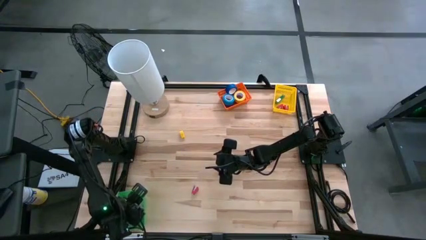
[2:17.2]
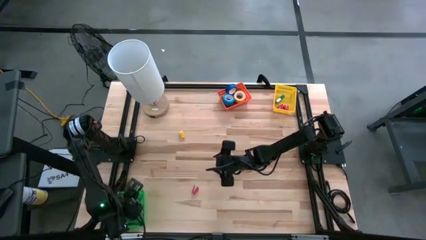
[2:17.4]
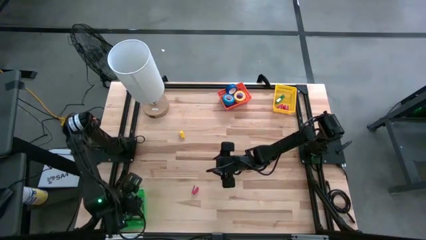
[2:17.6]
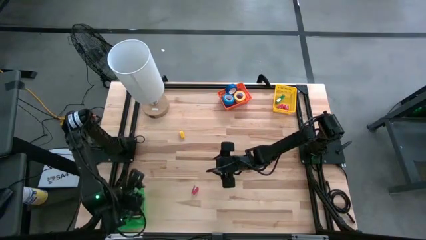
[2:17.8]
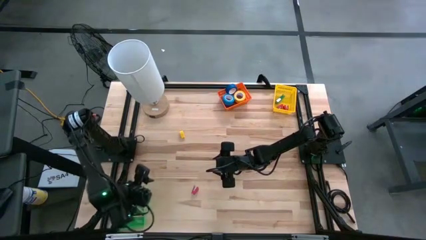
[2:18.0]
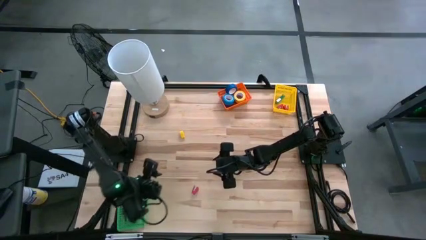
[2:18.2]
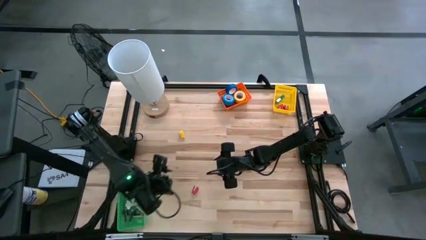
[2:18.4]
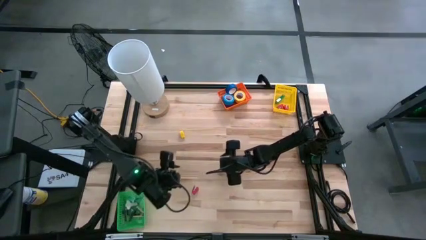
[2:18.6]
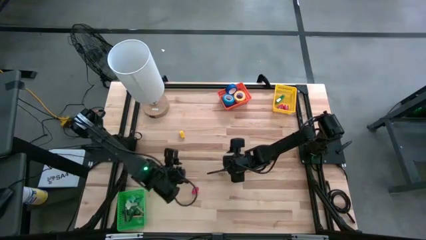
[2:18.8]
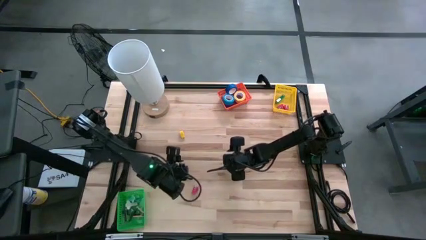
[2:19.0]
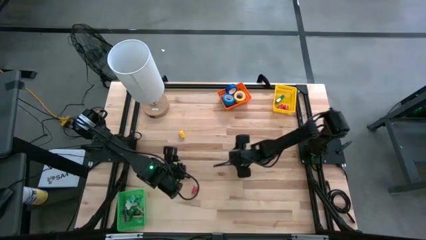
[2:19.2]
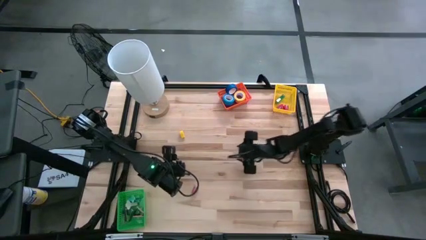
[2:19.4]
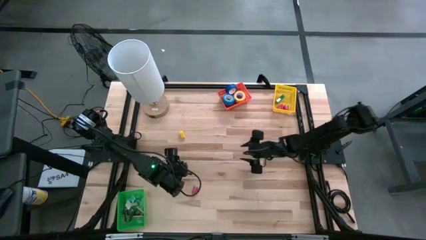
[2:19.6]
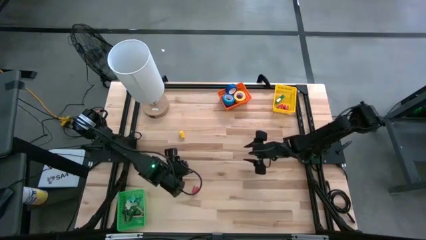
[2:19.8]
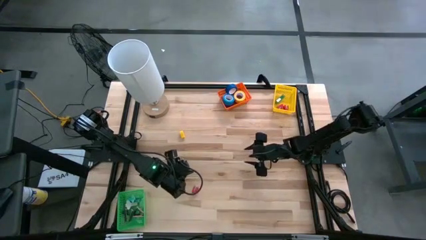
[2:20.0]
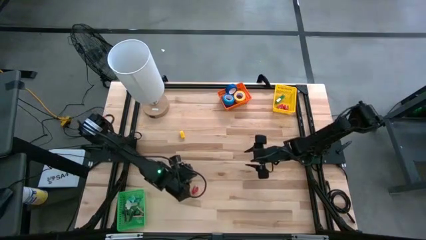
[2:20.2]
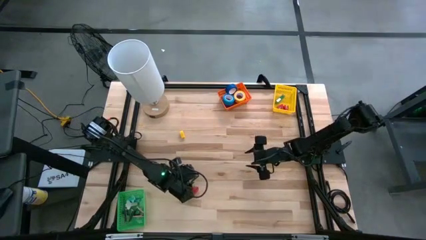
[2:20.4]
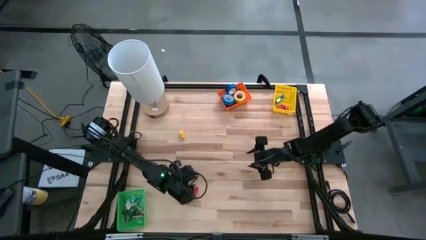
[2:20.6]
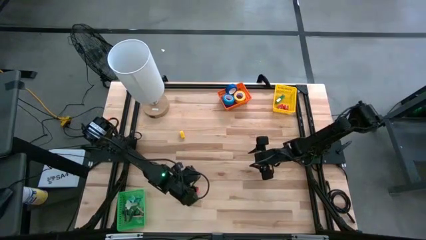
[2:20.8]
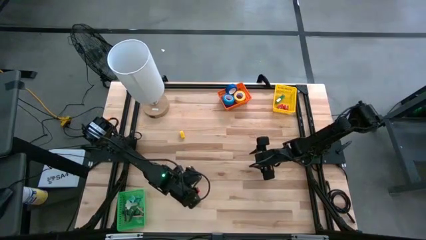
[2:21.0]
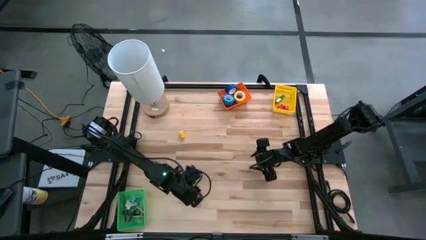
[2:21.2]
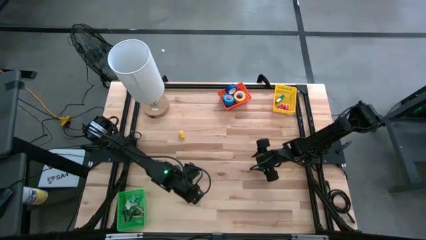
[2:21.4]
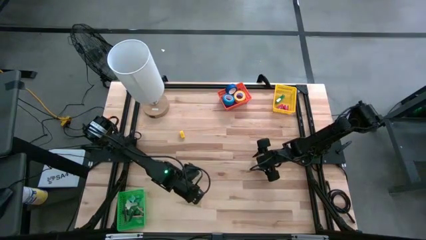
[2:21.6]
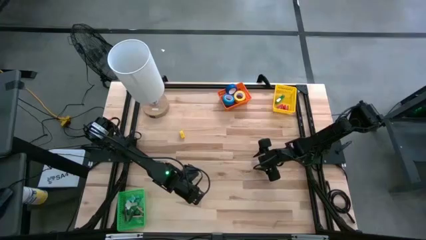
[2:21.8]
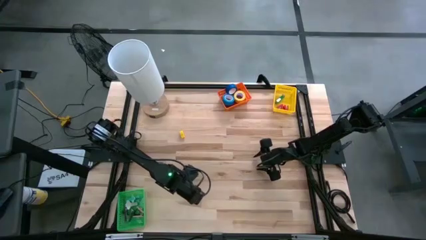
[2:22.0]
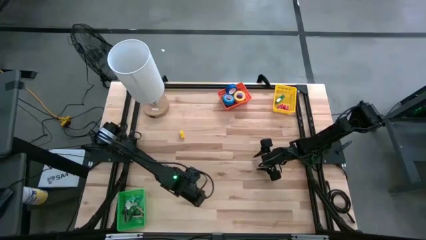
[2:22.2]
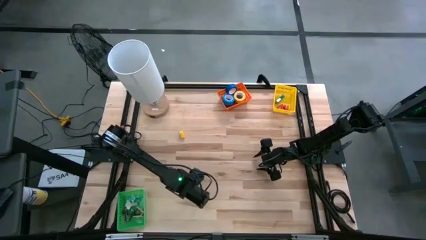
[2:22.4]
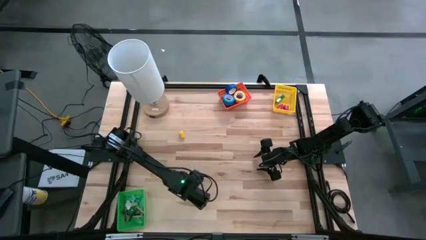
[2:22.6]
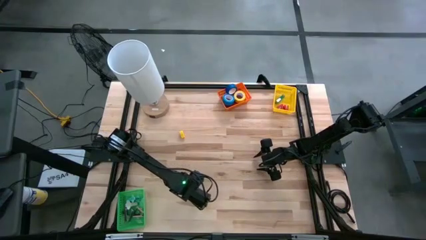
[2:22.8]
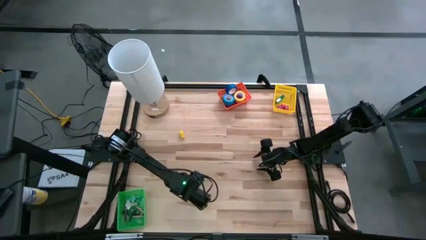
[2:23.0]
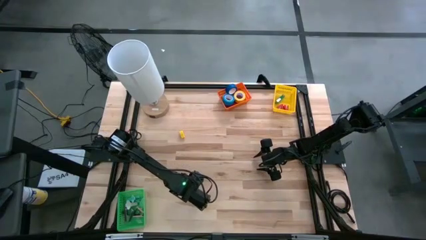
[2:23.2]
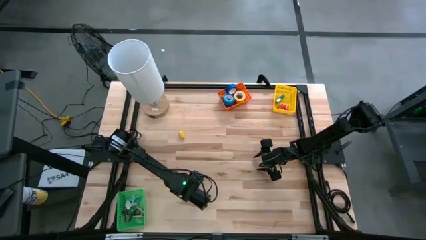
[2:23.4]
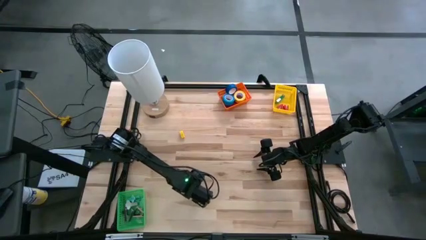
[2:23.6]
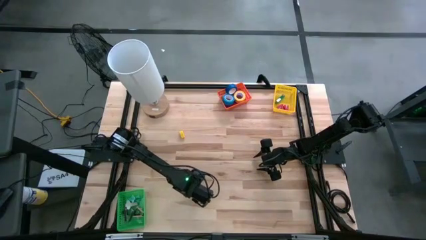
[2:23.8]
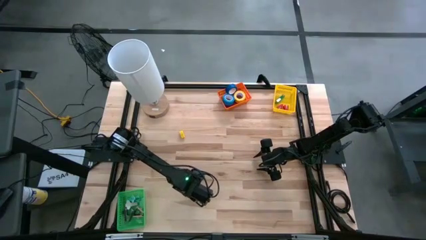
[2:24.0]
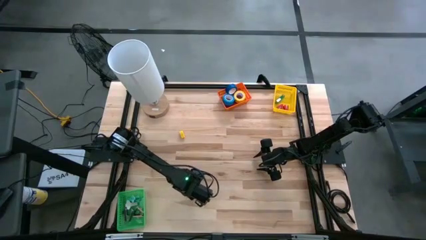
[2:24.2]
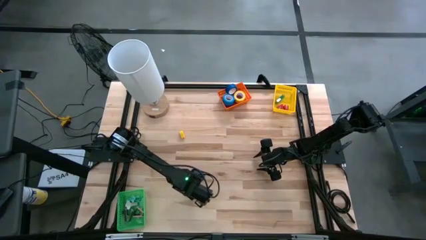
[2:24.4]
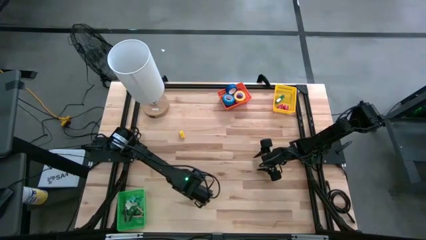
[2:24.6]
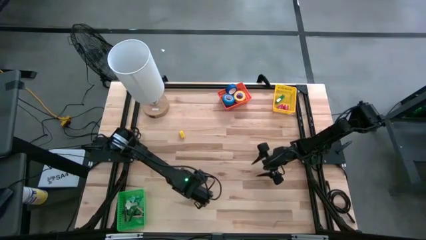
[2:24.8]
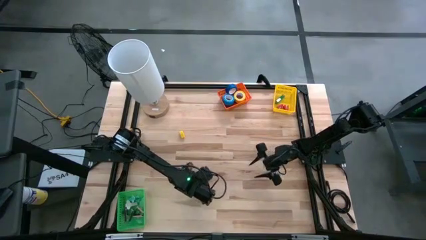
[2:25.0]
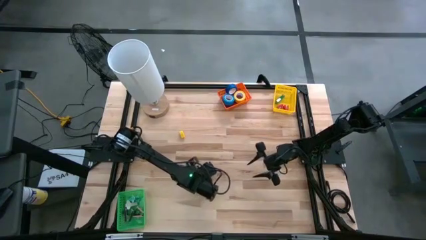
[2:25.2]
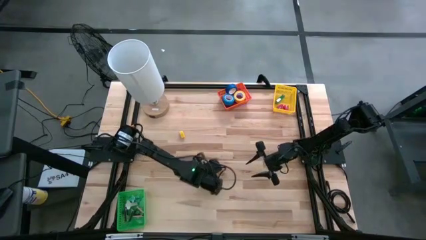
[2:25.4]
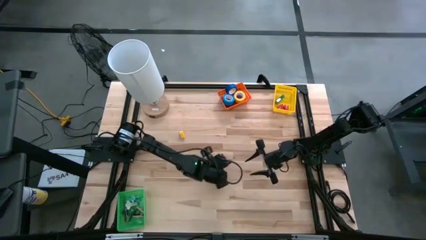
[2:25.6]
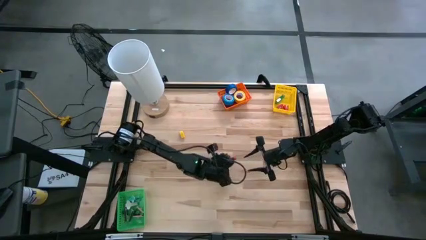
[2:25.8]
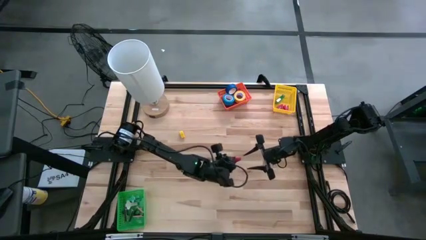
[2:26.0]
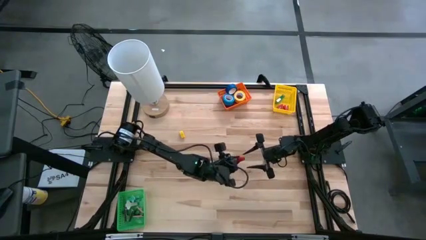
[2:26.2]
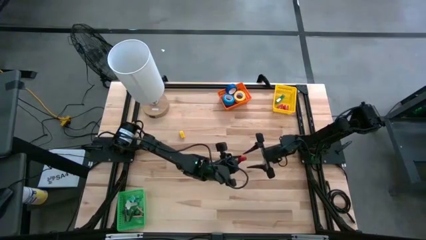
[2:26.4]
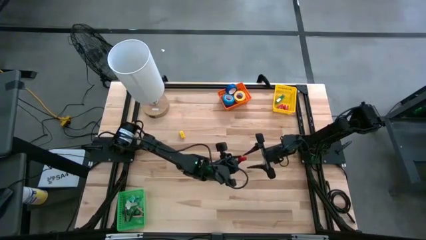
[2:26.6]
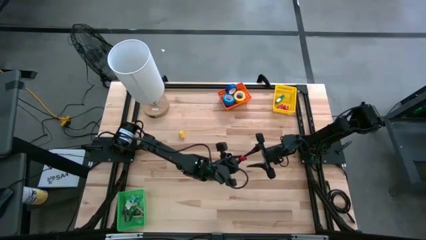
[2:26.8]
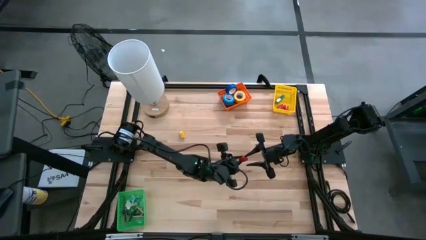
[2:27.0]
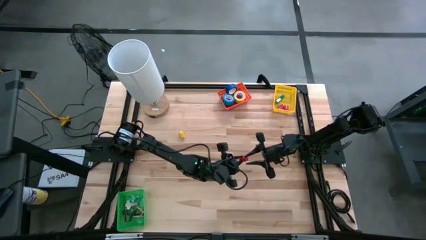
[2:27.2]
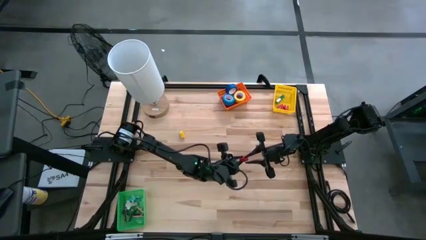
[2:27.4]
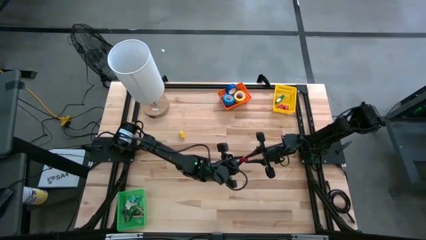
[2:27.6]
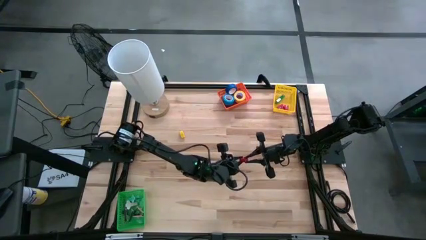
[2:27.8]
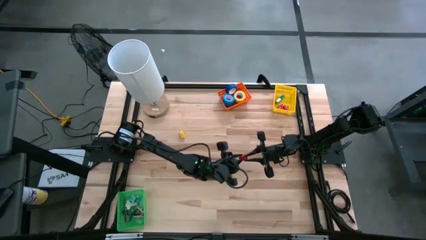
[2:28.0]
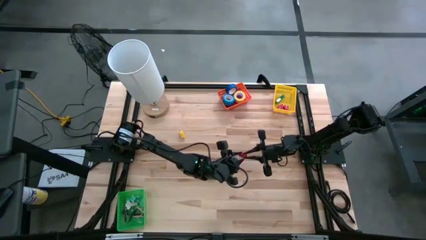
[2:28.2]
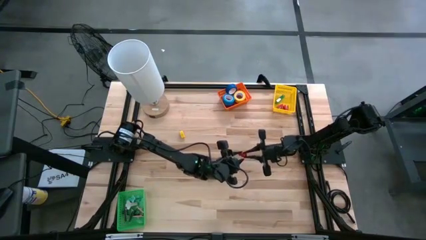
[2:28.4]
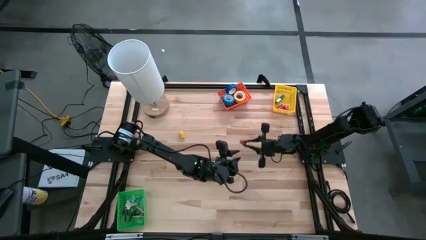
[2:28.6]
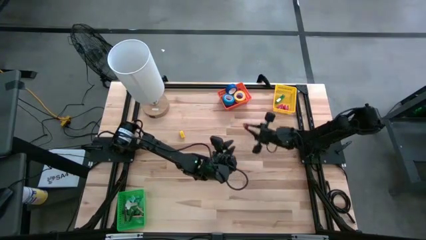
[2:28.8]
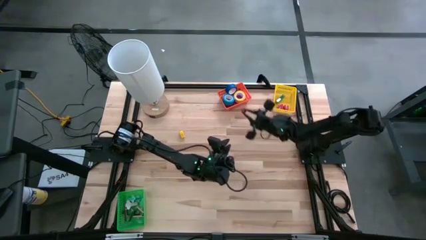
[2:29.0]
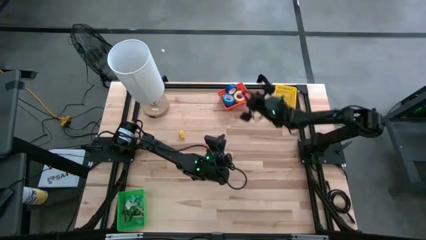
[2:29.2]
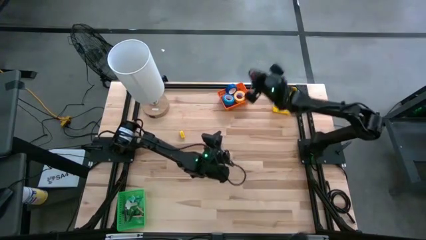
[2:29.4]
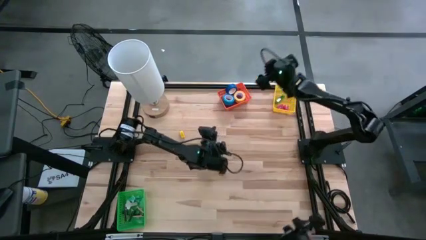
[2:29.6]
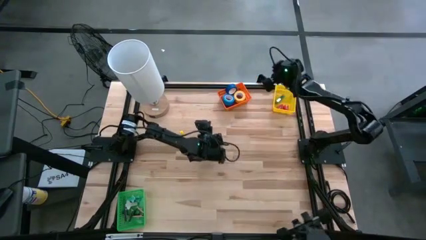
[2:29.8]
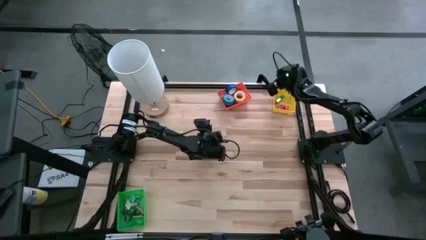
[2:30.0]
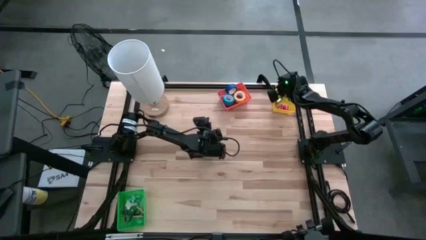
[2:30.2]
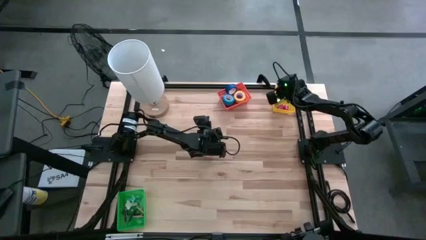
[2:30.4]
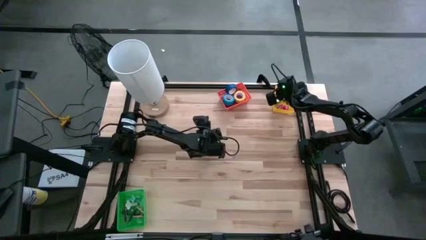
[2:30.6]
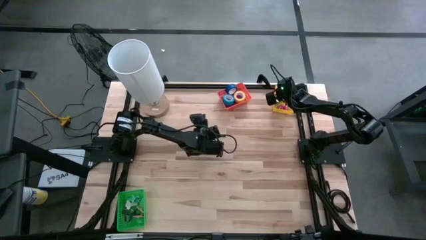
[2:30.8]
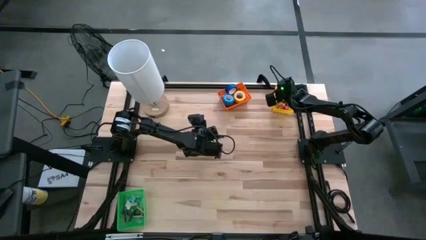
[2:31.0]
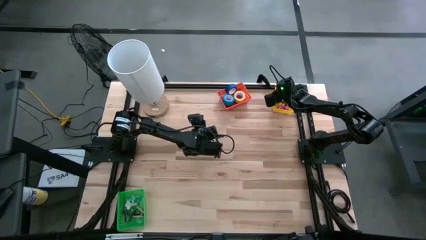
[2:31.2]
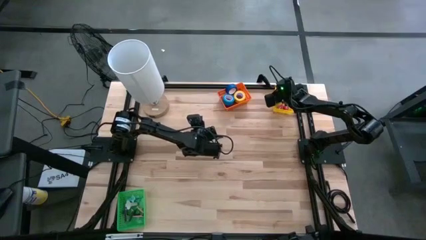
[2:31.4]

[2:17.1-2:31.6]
Task: Pick and place Stapler, Stapler remover, tape
Put the mini red stapler into the yellow bin

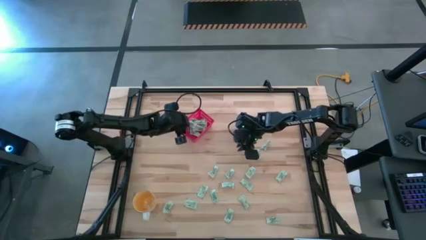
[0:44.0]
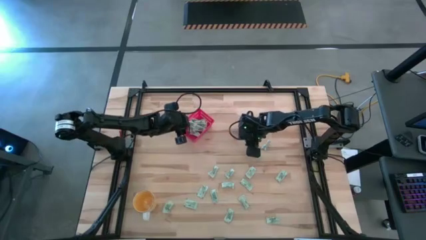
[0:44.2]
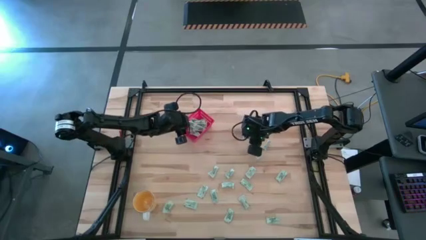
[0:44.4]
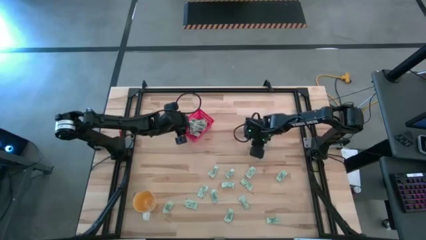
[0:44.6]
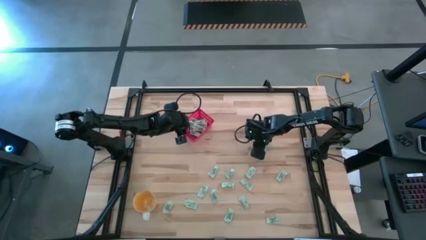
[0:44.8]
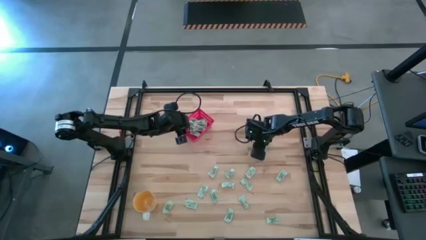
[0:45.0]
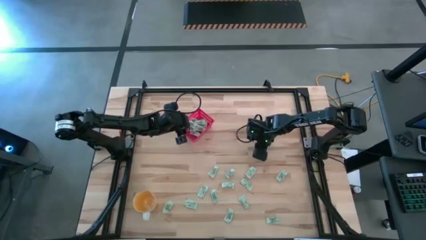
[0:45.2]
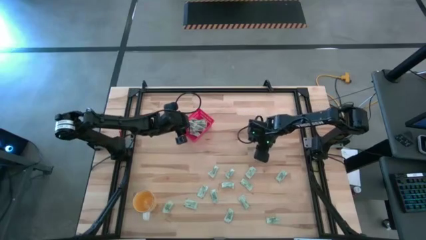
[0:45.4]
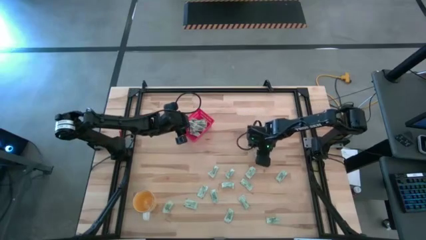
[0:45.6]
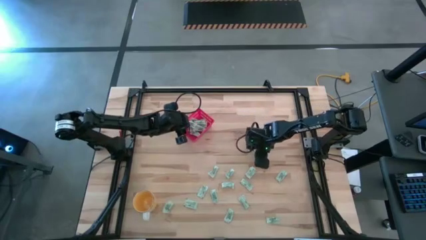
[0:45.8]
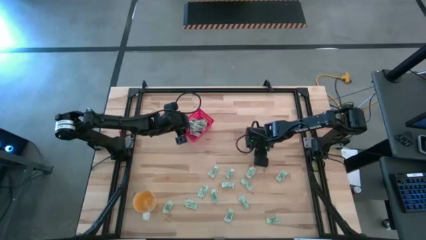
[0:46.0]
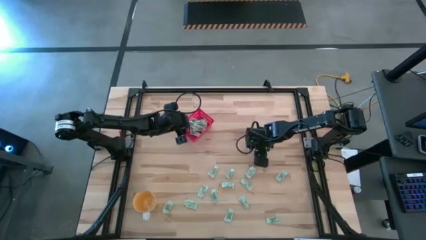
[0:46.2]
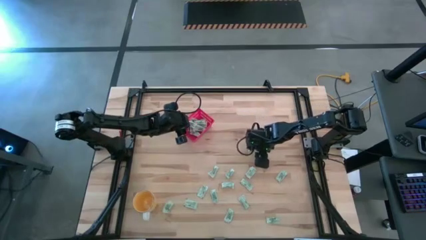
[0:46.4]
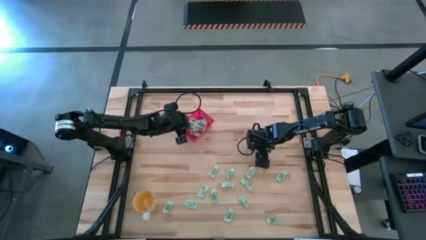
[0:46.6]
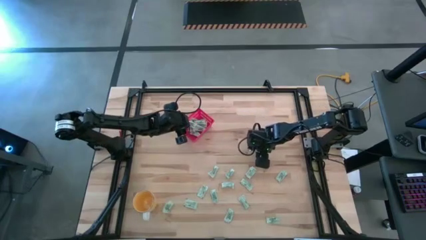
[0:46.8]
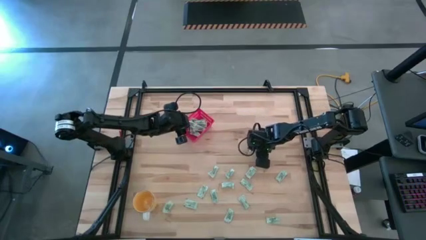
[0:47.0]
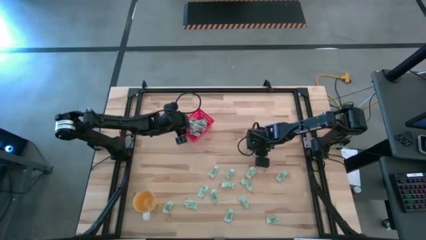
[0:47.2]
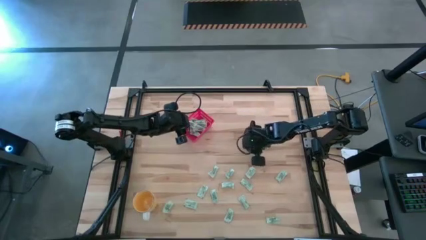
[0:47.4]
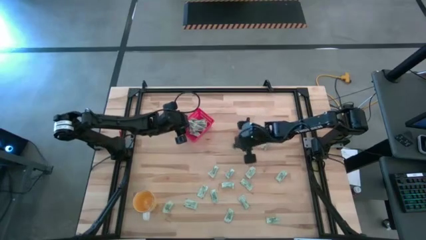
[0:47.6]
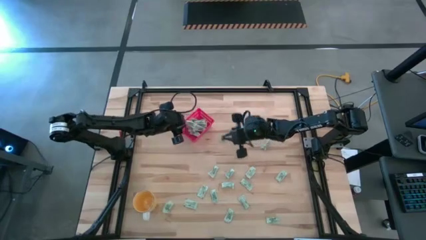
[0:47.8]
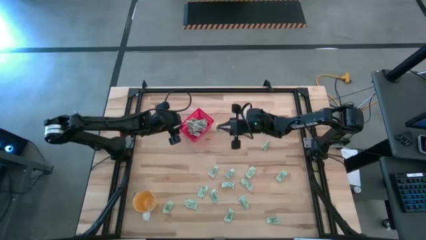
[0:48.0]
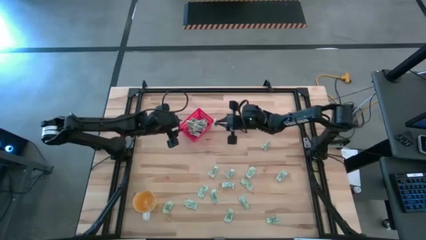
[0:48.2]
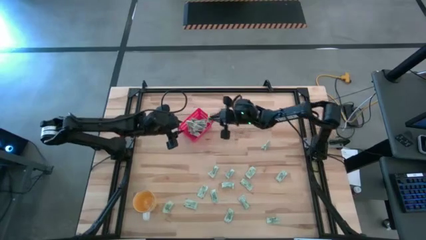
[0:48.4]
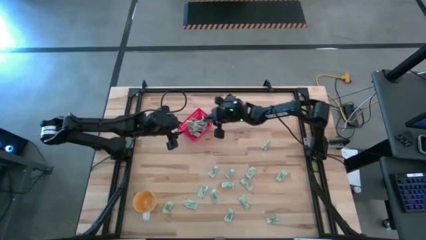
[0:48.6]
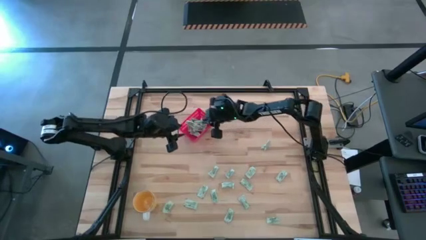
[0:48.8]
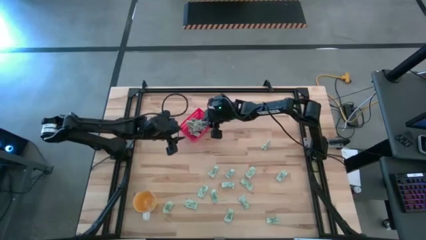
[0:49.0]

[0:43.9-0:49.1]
Task: Pick and place Stevia / Truvia into bins
Put the white stevia packet into the red bin
